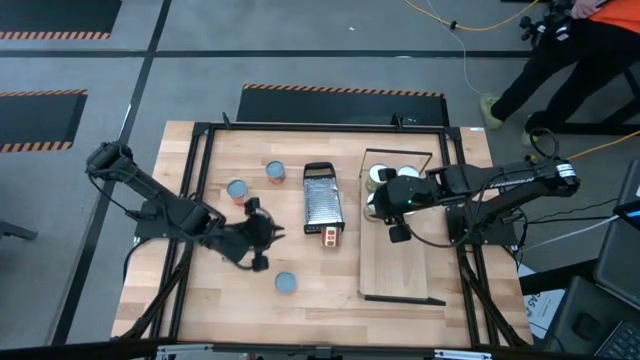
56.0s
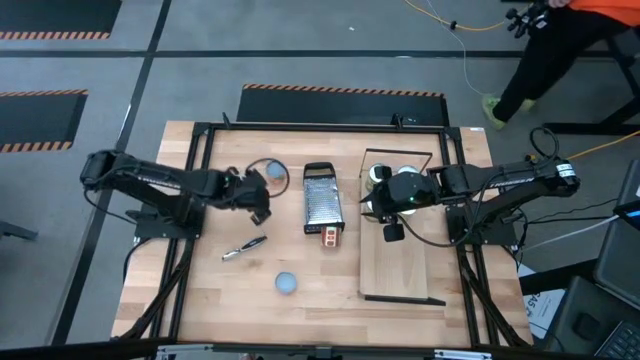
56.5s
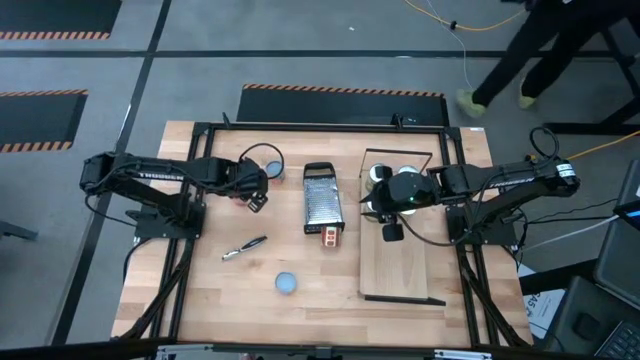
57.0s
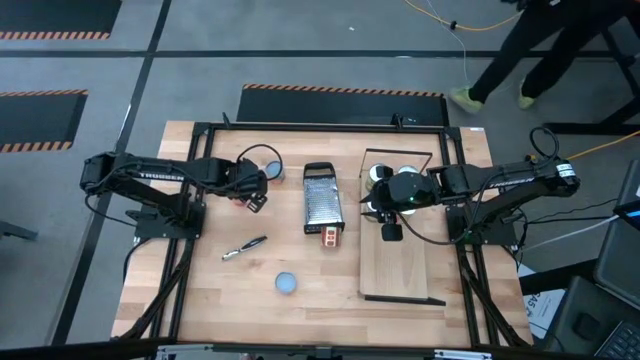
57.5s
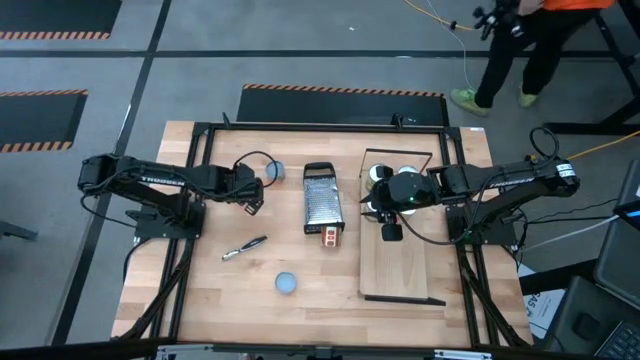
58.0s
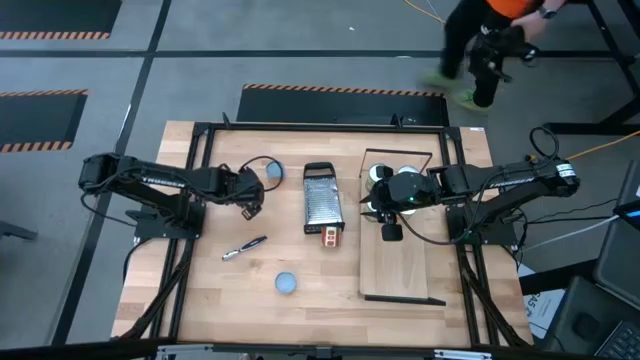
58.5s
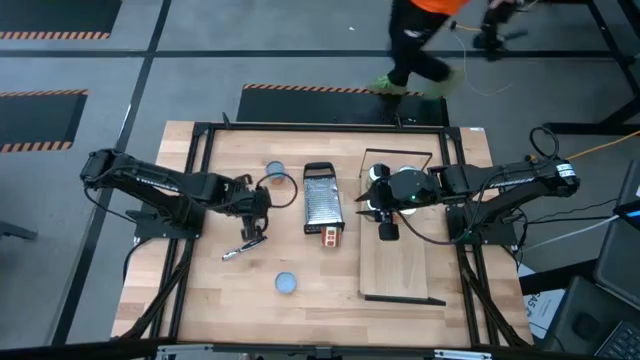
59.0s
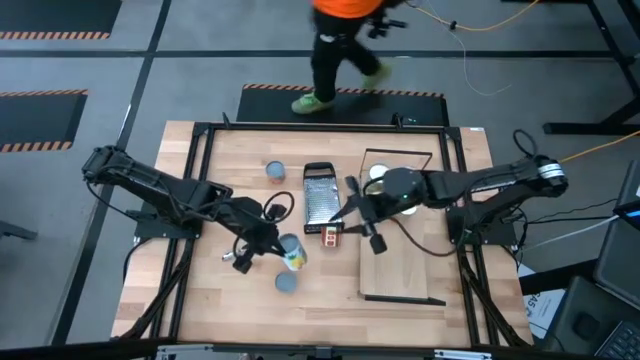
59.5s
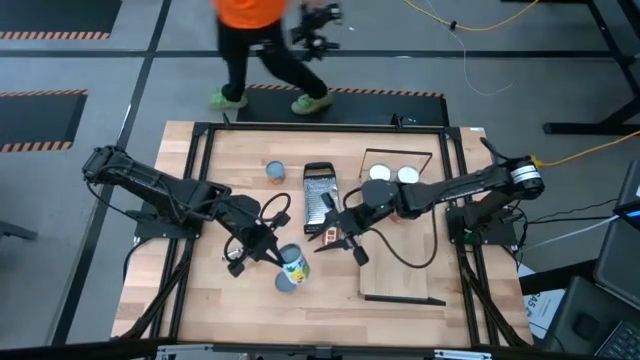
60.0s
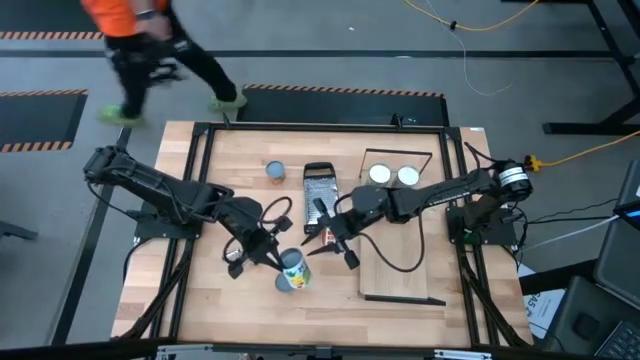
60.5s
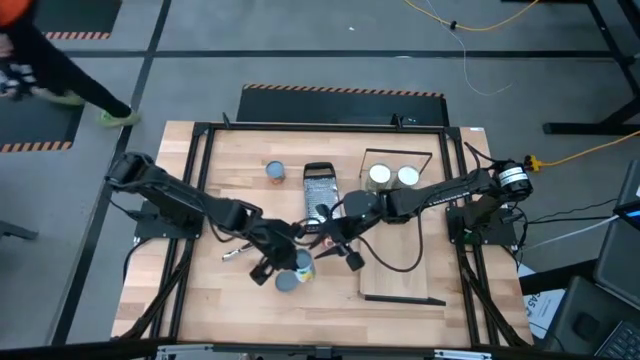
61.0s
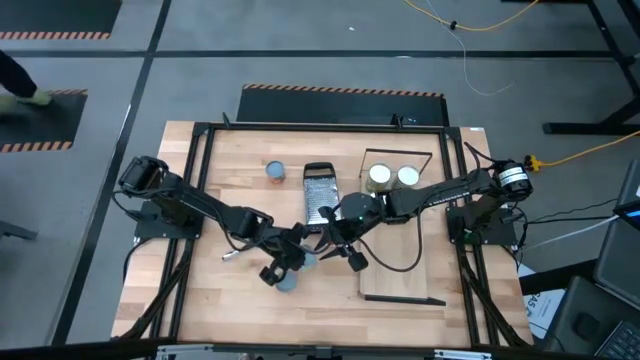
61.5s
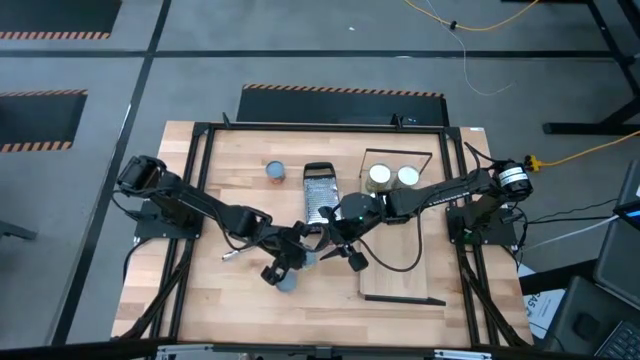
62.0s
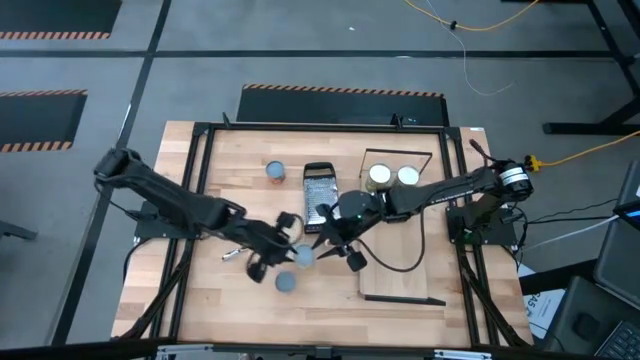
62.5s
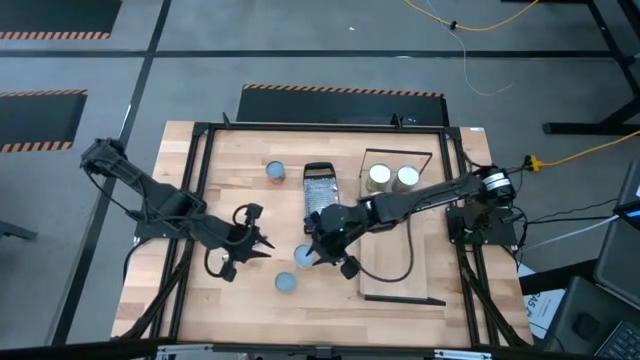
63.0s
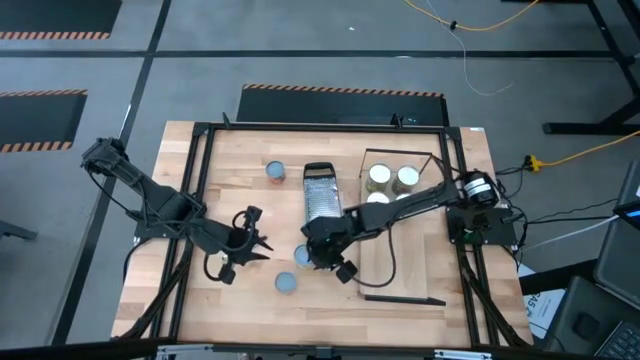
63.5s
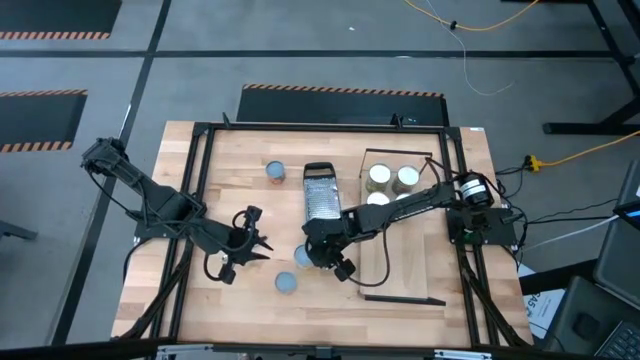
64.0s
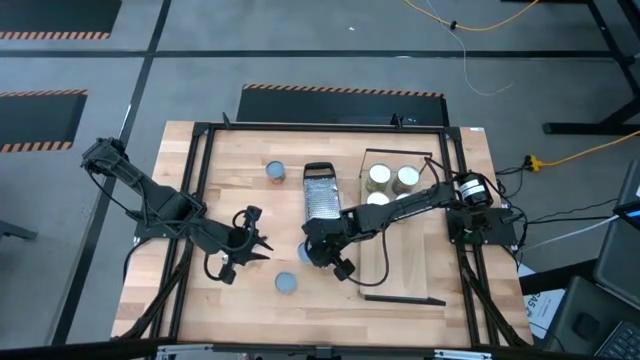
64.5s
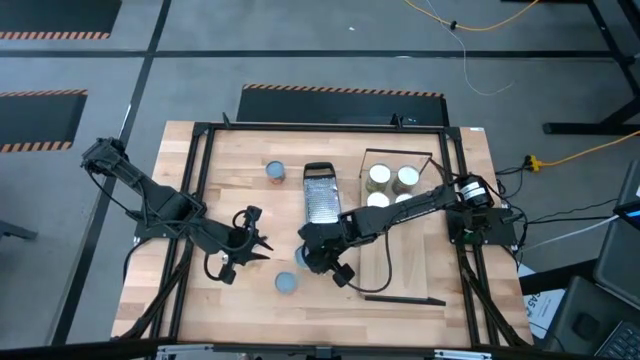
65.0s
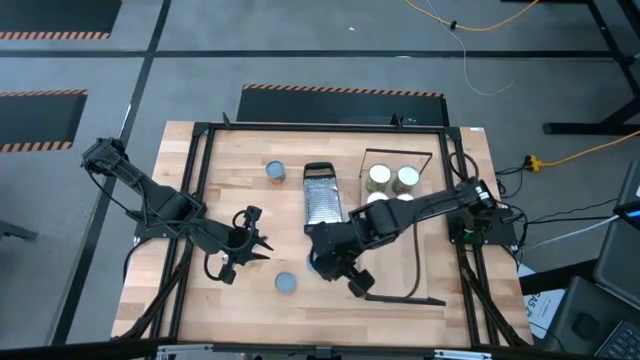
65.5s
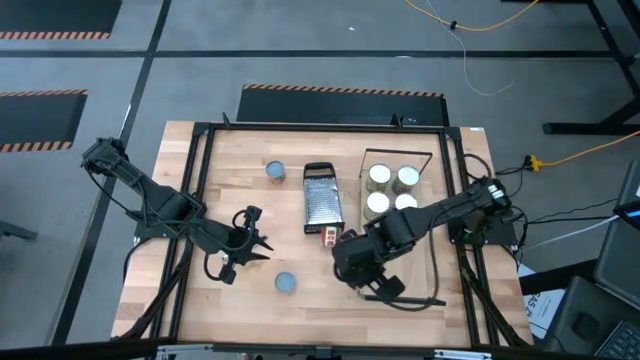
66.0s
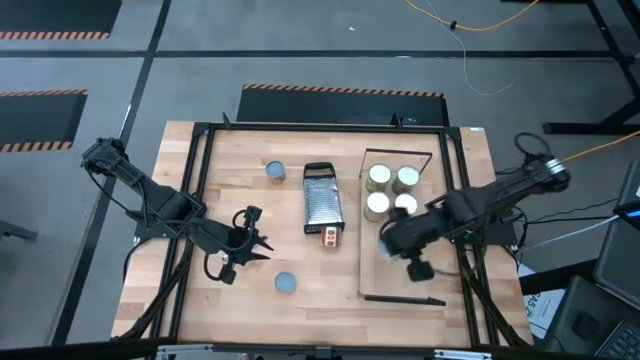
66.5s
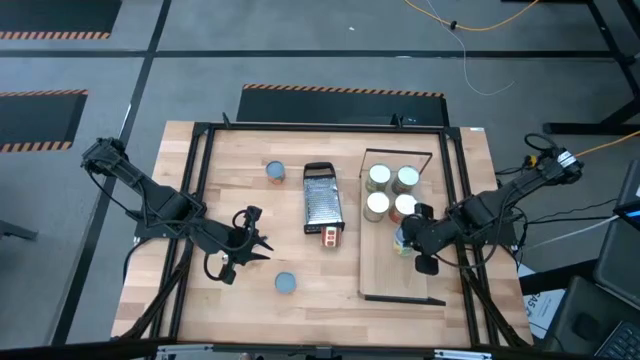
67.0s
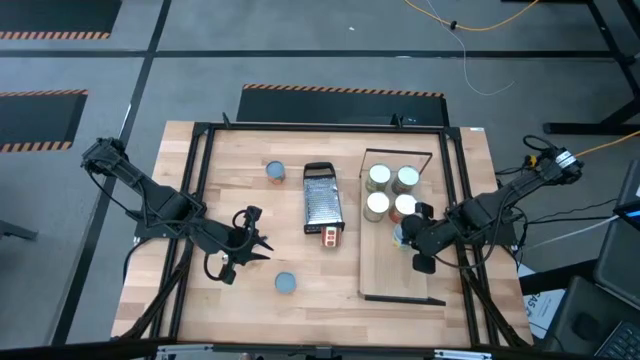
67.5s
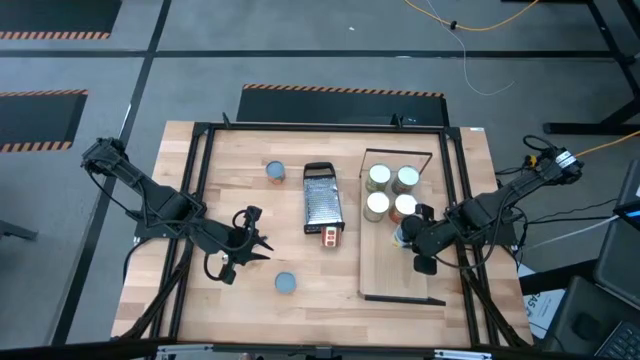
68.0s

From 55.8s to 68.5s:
Task: Pick and place cans onto a shelf
Put the canned mixed fruits on the shelf

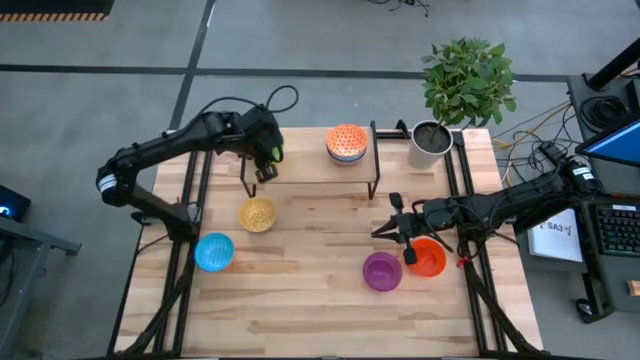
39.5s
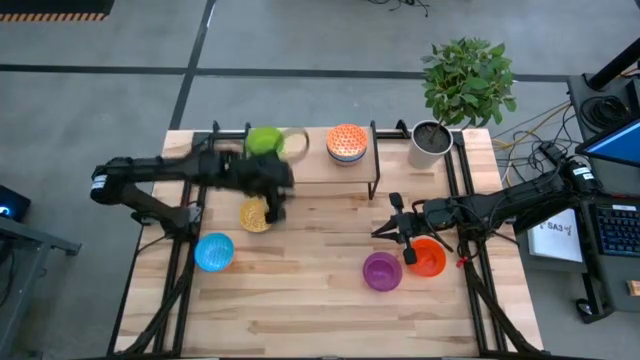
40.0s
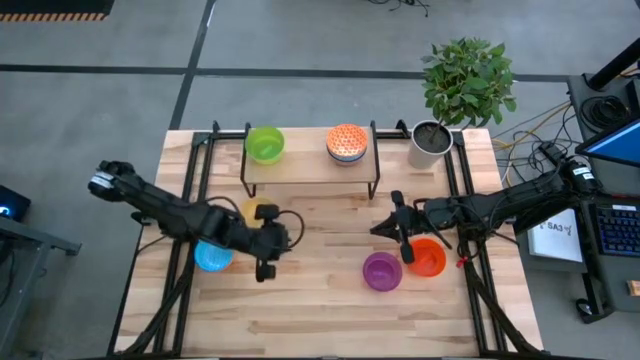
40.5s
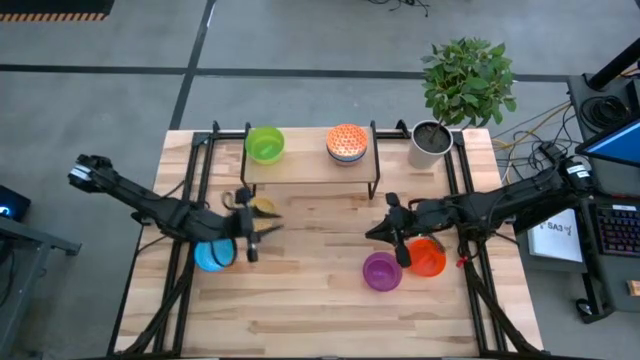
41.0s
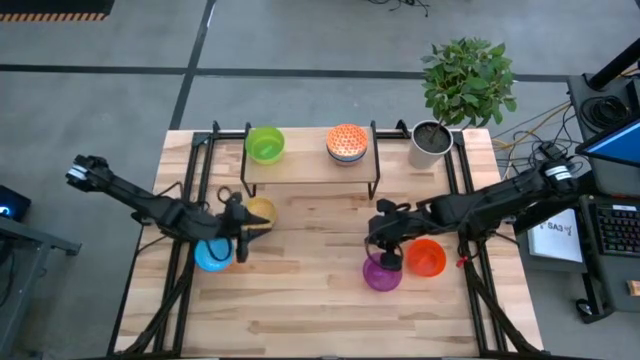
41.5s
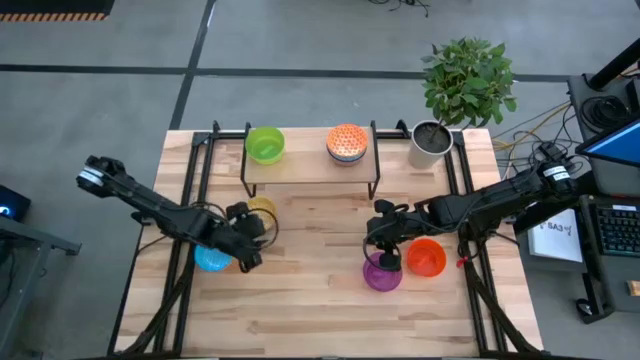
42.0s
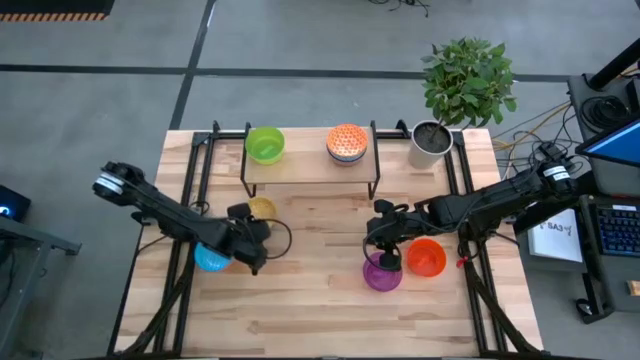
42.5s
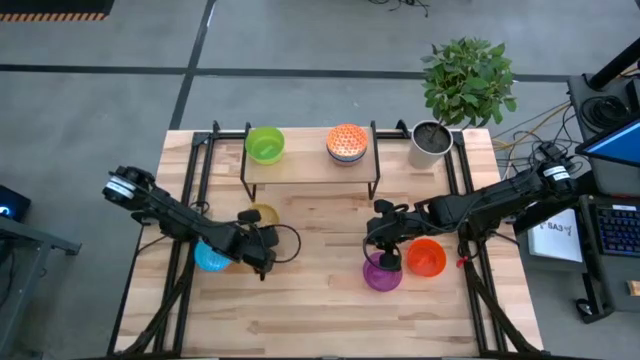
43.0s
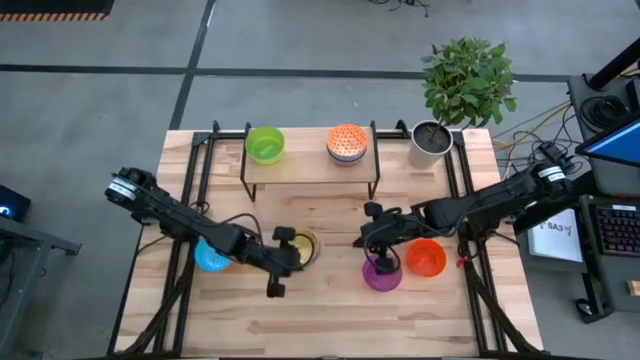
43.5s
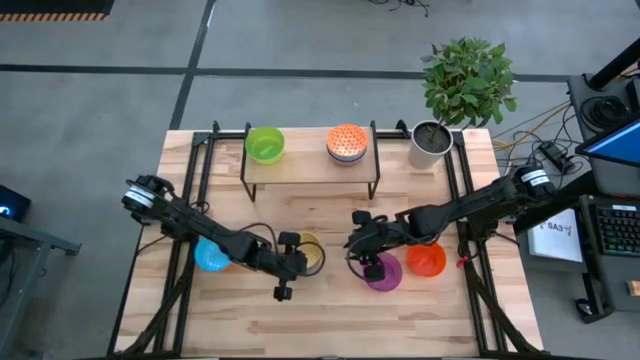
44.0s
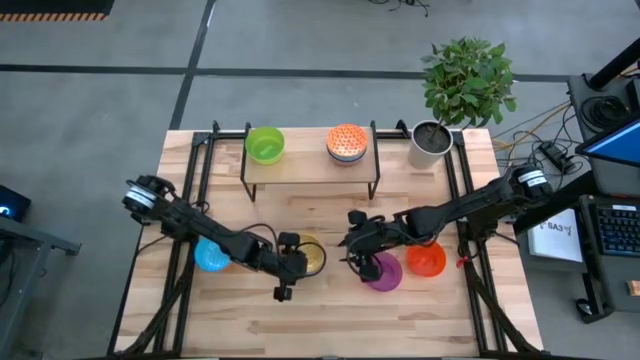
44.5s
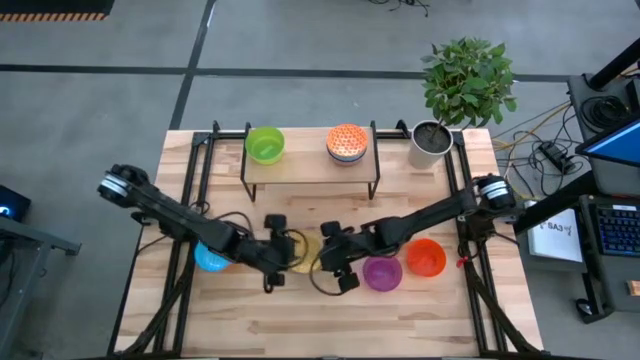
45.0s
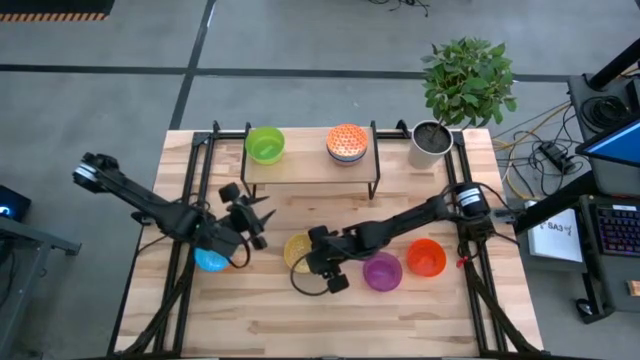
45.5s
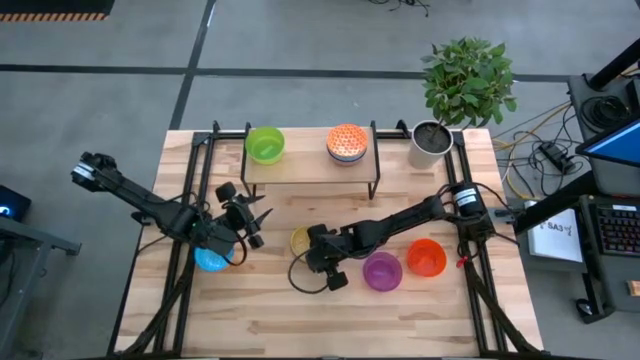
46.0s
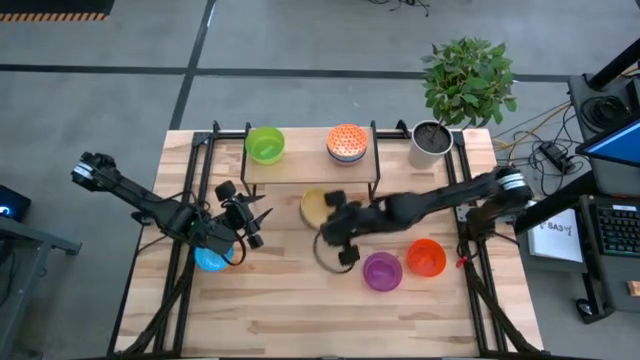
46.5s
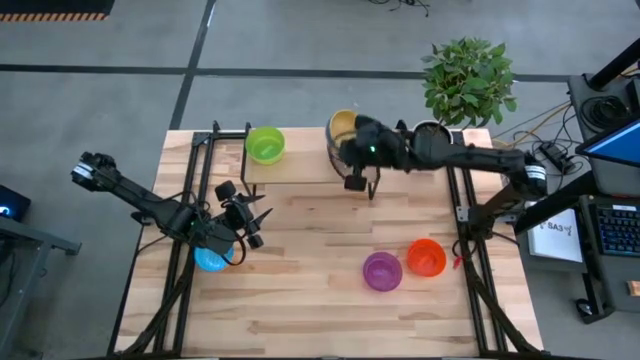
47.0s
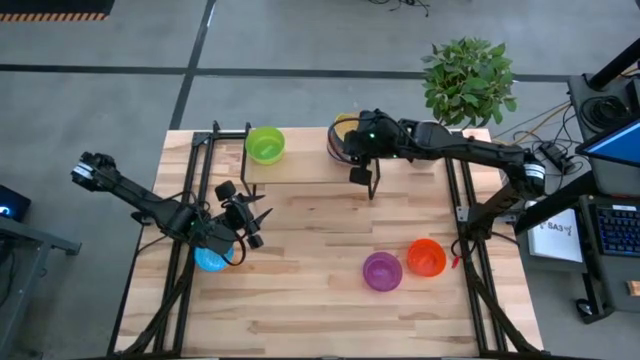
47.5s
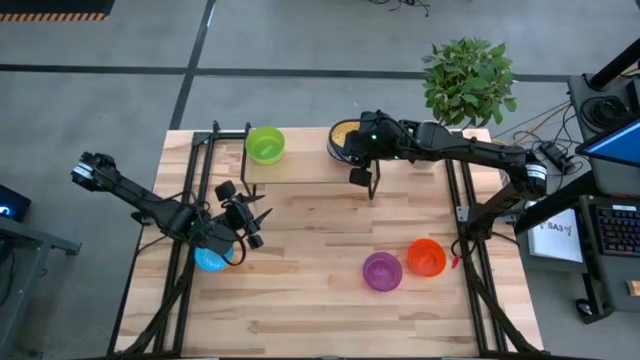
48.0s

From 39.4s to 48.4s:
Task: Place and stack bowls onto a shelf
Stack the blue bowl on the top of the light blue bowl on the shelf
